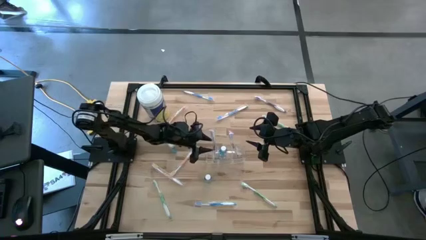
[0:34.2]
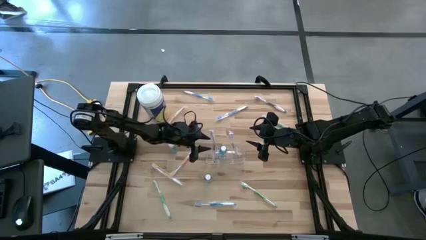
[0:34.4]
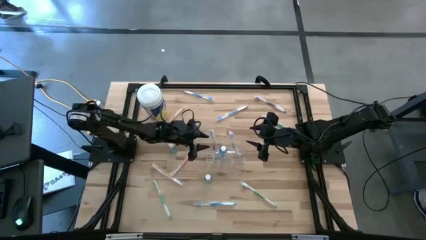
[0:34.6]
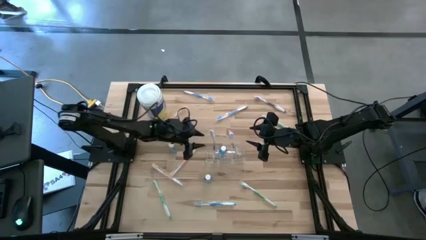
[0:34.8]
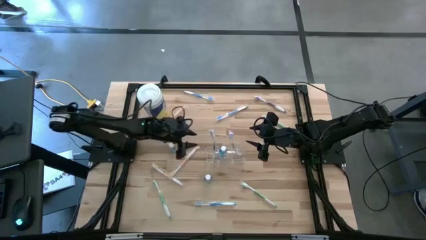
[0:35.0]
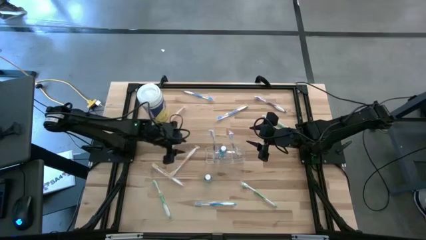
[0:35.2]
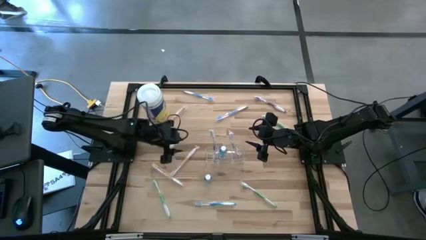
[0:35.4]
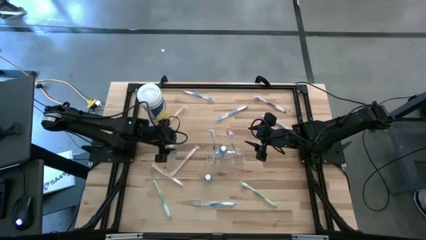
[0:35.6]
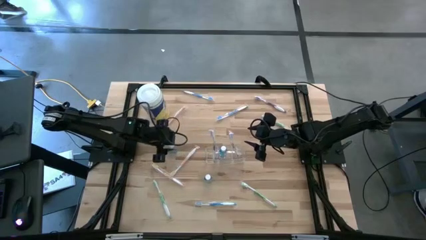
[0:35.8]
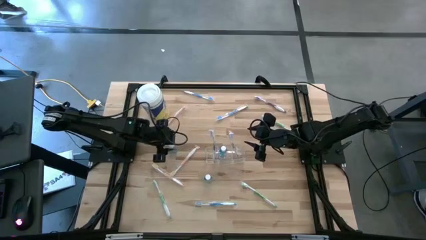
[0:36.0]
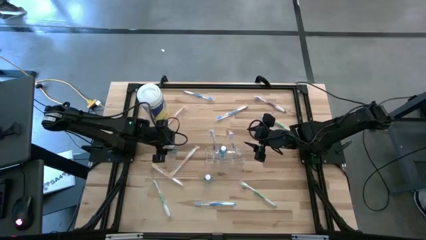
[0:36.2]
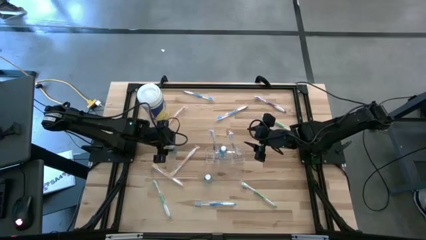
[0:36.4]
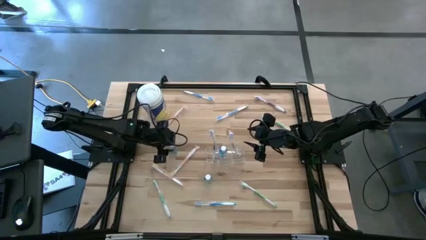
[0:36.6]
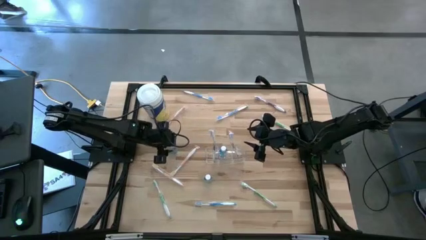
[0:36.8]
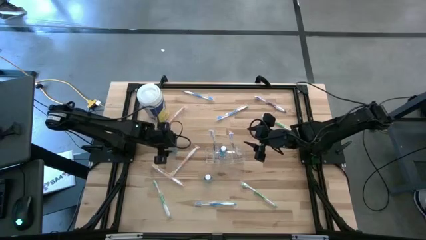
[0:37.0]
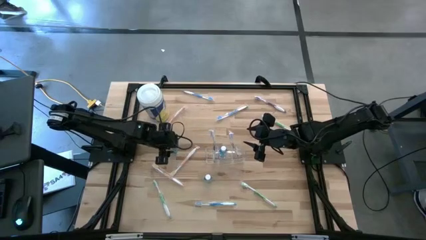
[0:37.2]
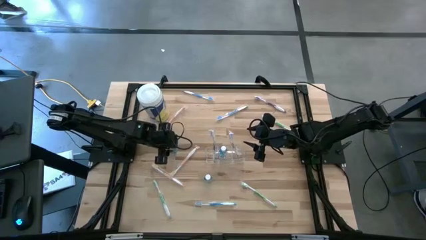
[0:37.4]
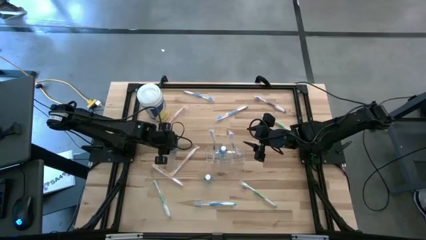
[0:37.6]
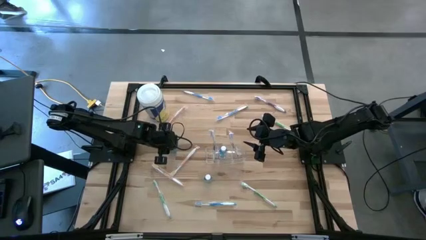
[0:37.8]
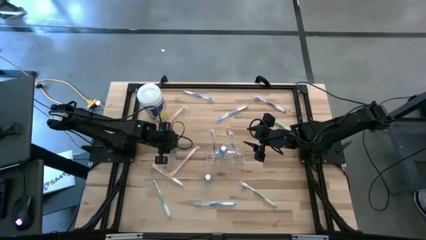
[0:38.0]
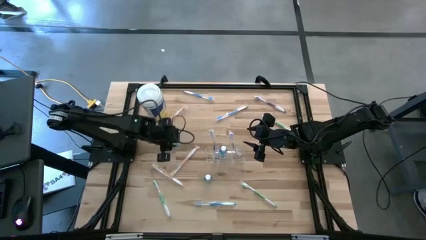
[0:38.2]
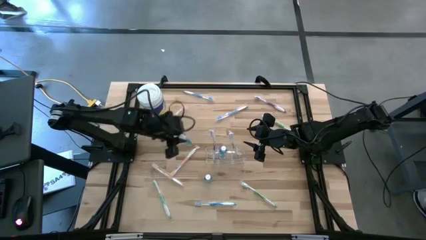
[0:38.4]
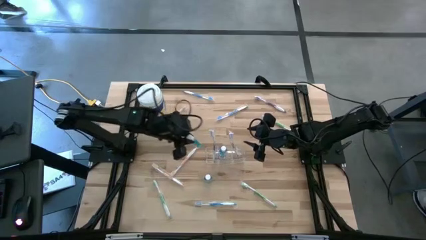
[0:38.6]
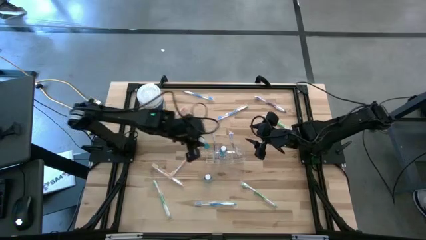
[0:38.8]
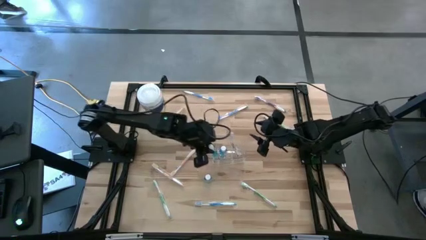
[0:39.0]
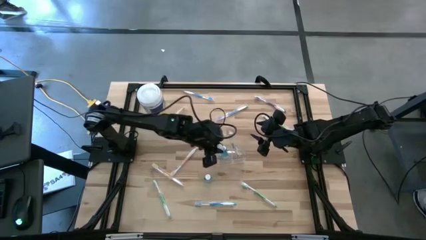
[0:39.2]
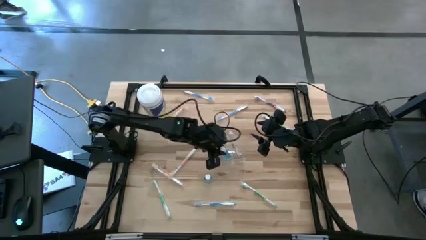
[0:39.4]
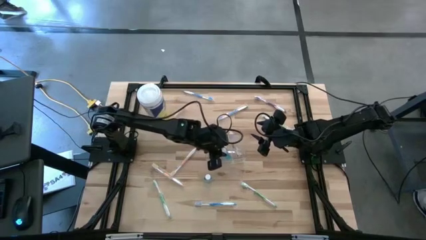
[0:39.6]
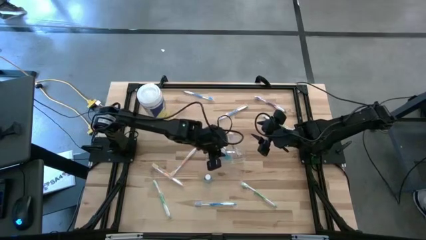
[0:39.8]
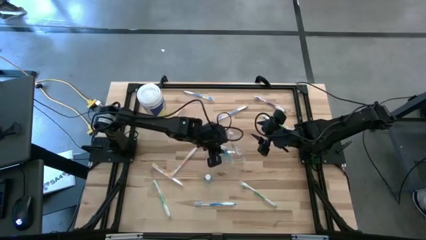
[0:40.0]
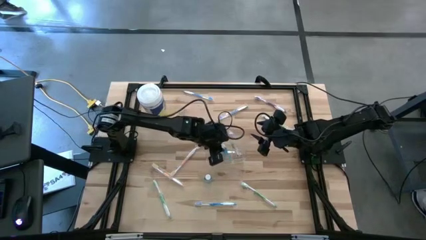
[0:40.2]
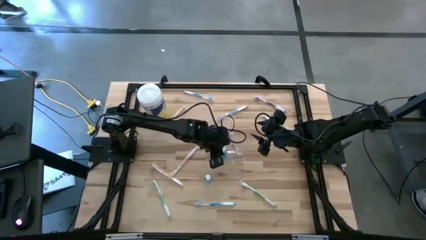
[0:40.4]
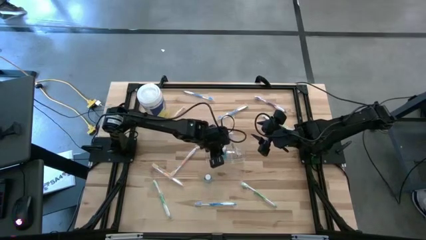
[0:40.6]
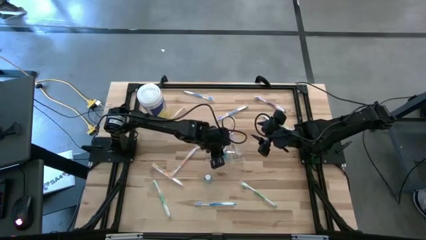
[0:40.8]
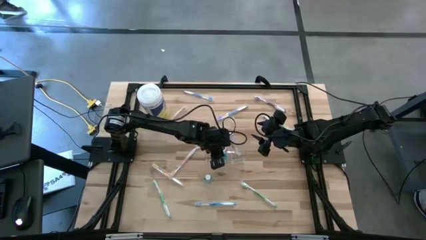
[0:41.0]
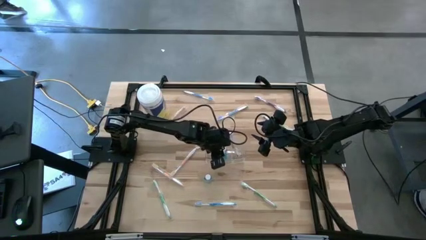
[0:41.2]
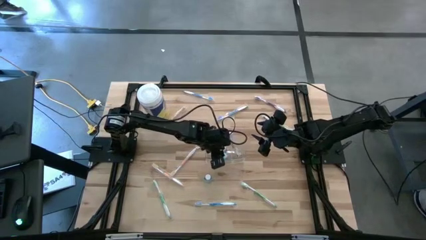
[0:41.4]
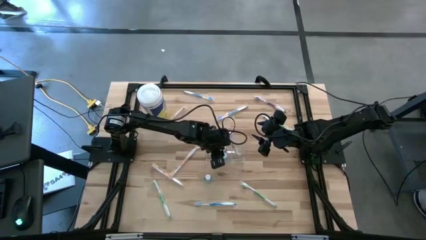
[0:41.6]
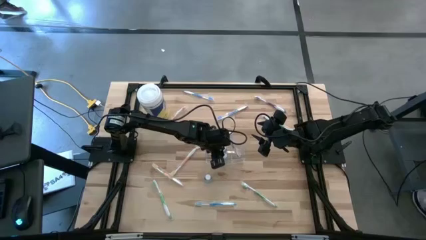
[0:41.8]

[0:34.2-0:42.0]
Task: Pick & Place toothbrushing station
Put the top blue mouthwash into the transparent organizer

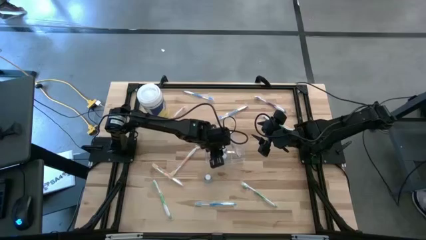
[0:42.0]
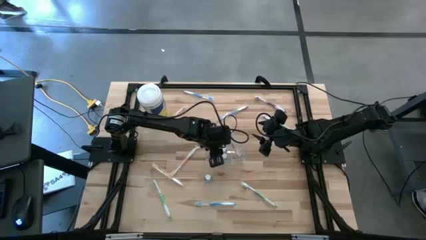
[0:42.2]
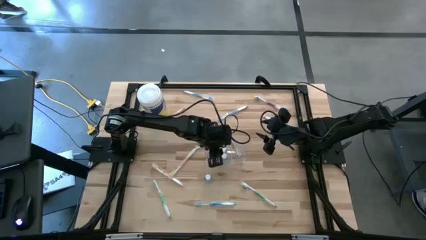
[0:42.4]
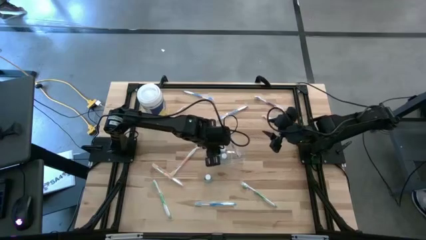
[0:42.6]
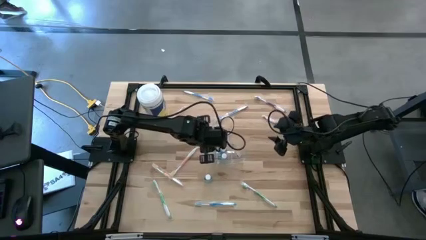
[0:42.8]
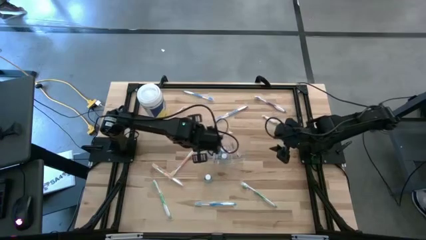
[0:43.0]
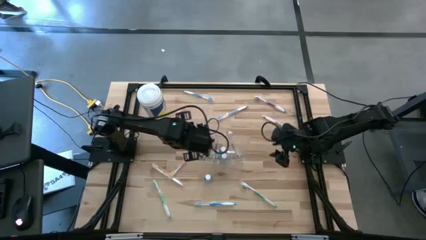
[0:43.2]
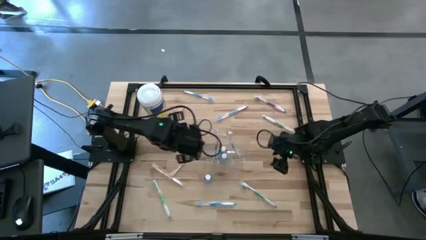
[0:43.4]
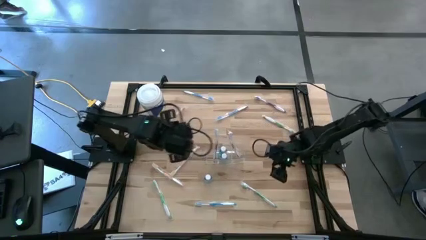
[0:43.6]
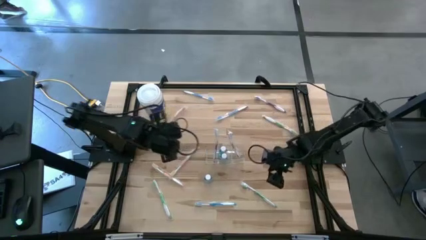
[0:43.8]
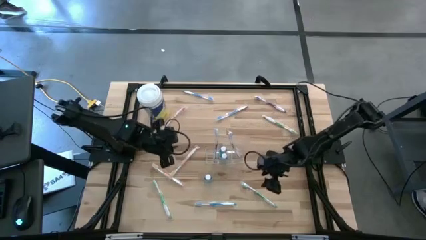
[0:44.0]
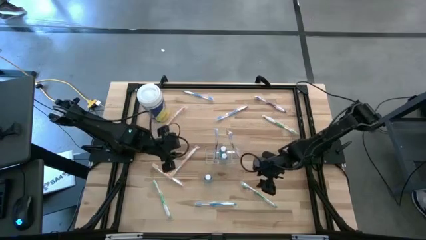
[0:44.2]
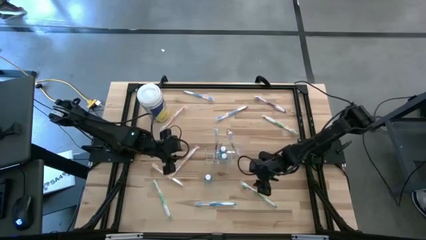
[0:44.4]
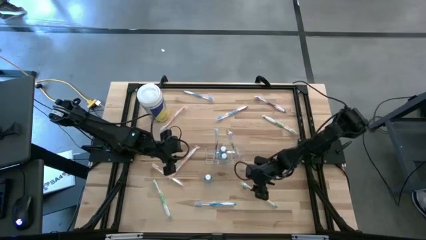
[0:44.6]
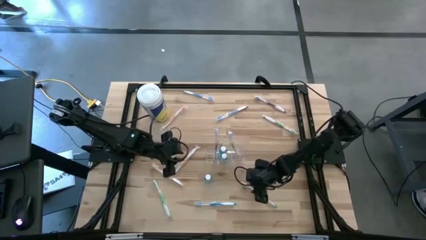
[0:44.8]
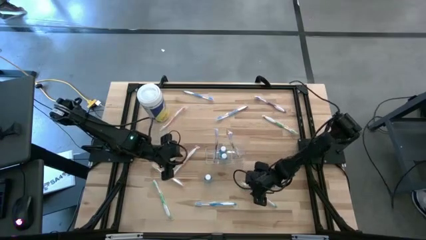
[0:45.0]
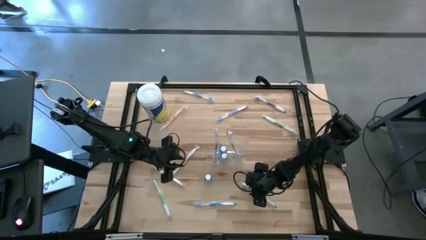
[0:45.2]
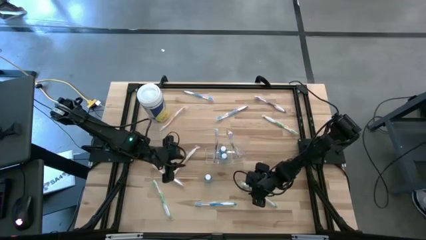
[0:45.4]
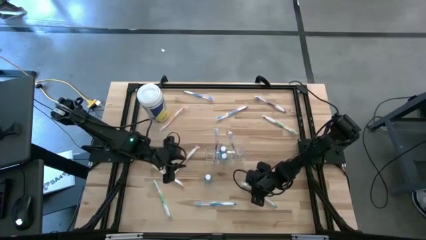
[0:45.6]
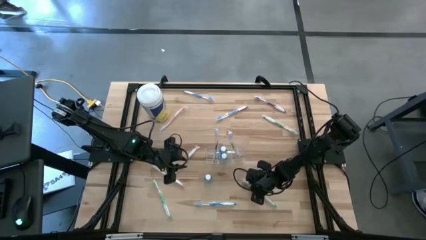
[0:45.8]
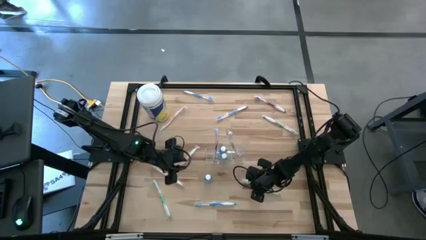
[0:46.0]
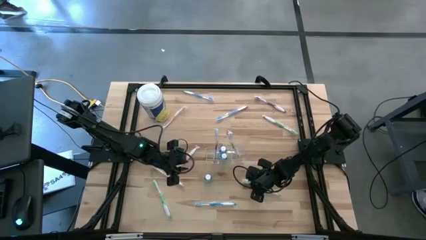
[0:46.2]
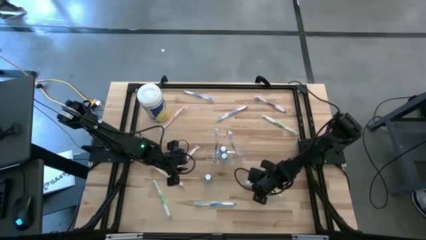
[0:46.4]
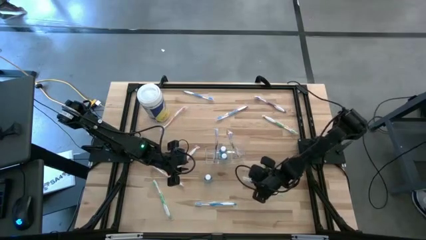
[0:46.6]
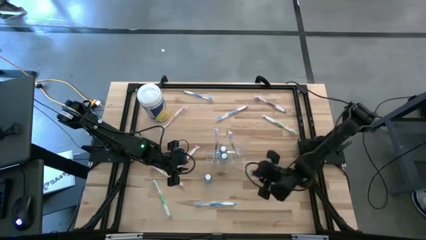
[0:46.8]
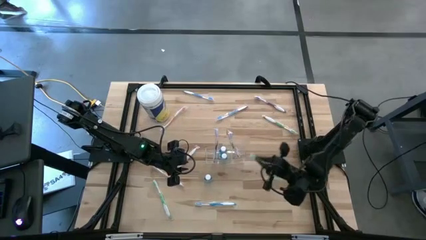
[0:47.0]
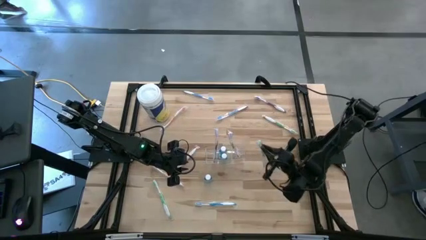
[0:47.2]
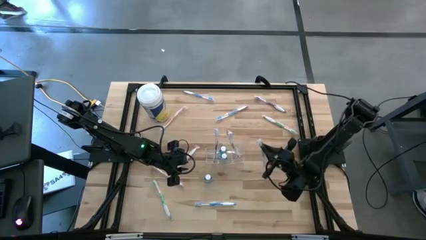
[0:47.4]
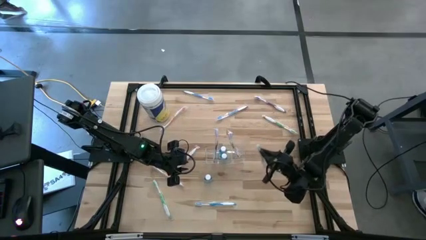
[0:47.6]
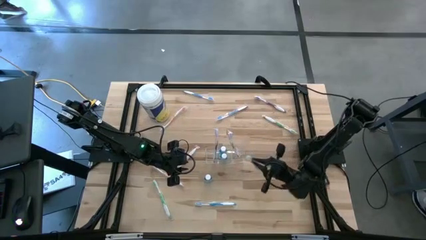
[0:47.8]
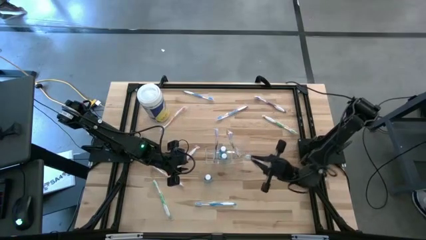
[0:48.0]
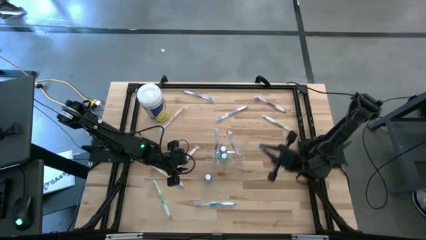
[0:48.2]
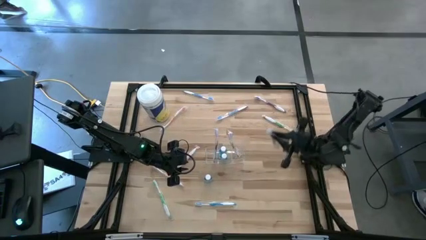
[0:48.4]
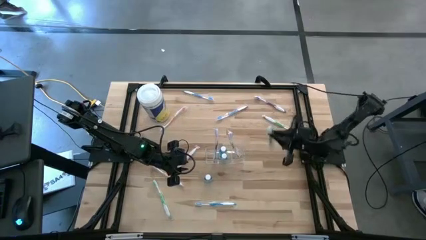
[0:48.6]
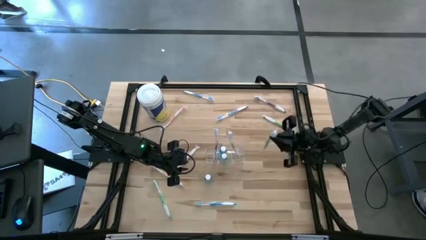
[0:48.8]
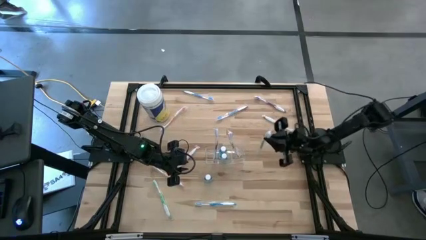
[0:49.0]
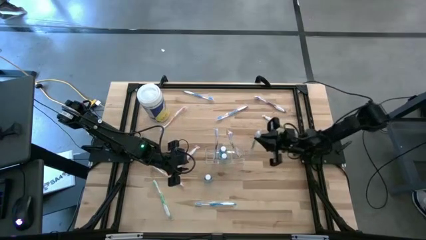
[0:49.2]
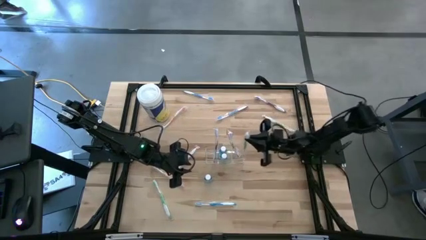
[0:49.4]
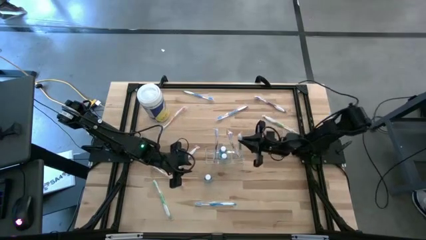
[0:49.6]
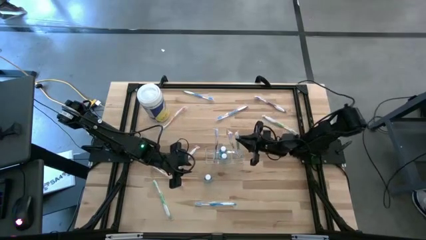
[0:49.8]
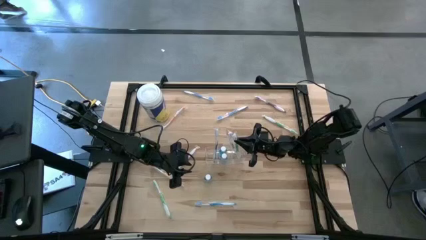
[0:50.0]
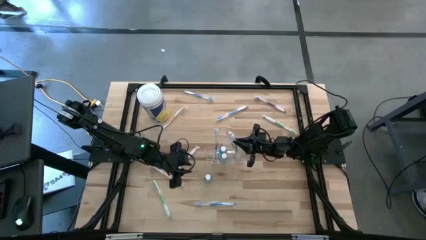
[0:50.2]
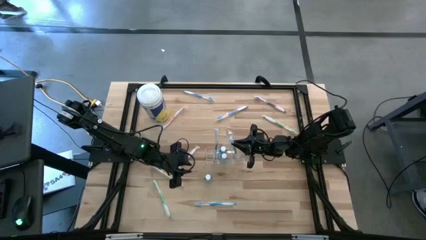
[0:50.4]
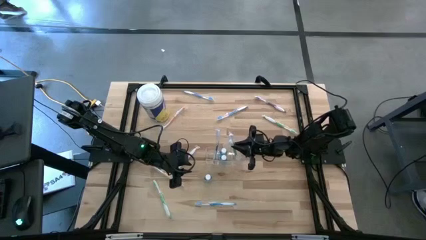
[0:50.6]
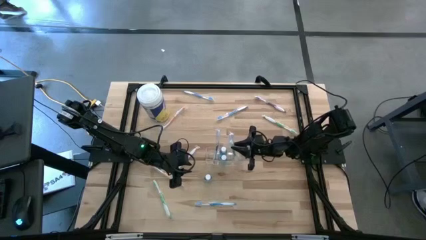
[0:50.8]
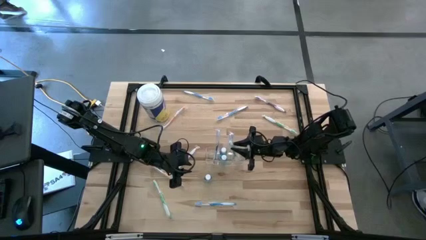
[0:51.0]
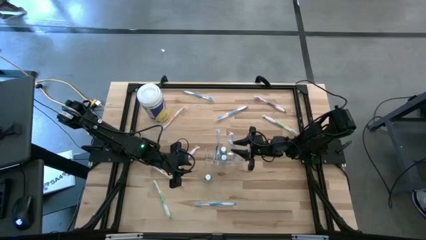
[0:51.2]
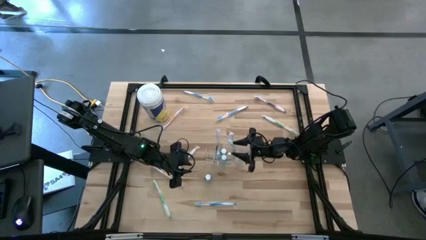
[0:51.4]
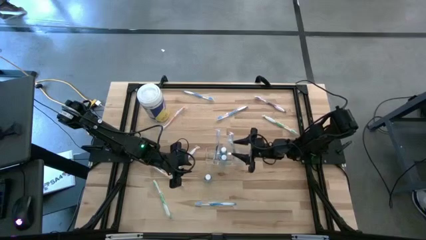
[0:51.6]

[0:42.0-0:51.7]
Put the bottom right green toothbrush into the transparent organizer
